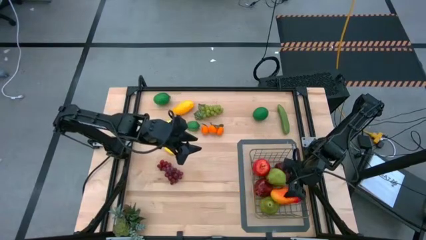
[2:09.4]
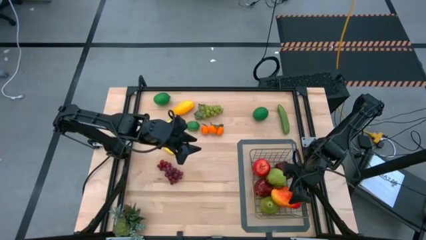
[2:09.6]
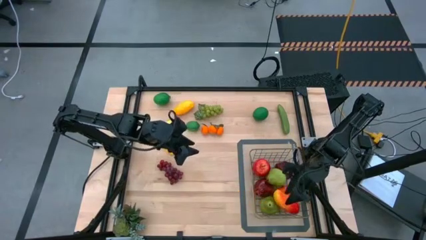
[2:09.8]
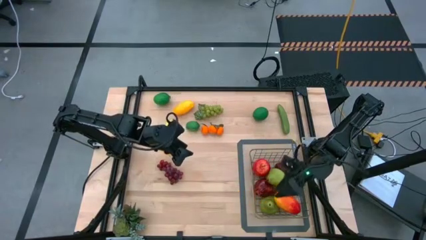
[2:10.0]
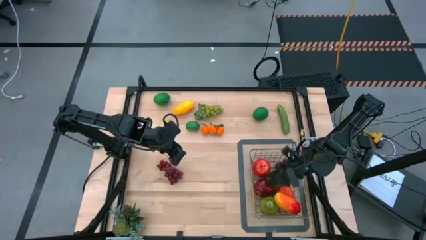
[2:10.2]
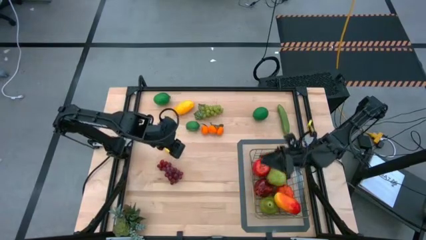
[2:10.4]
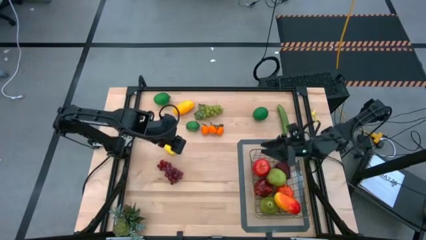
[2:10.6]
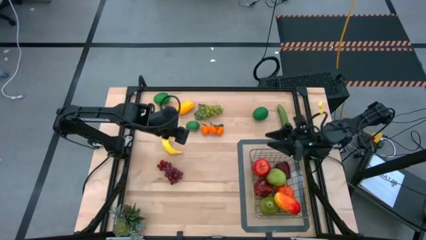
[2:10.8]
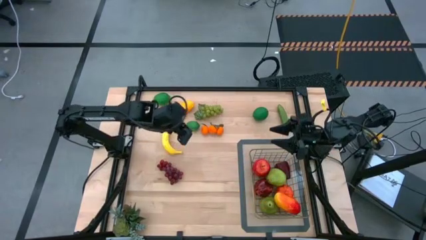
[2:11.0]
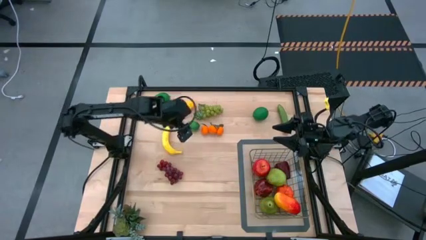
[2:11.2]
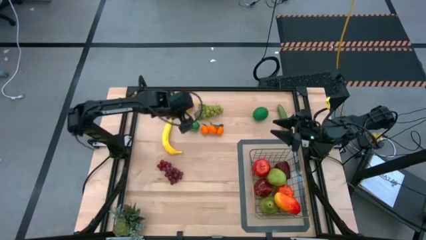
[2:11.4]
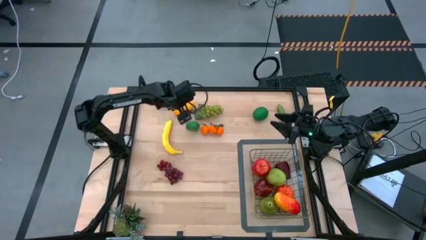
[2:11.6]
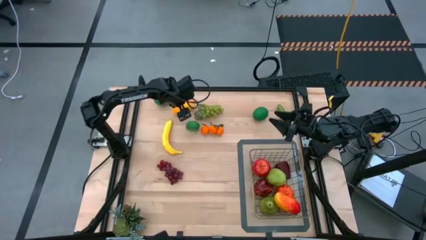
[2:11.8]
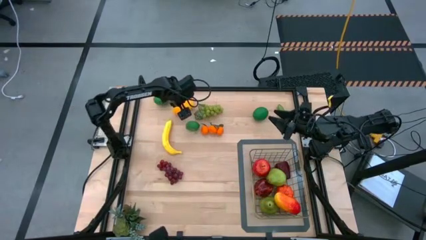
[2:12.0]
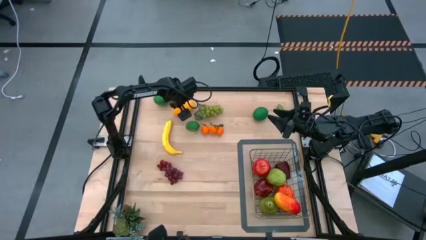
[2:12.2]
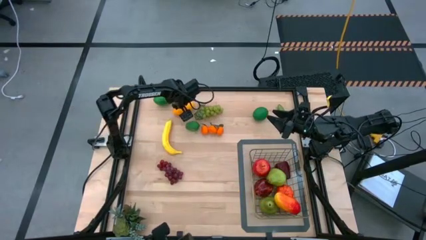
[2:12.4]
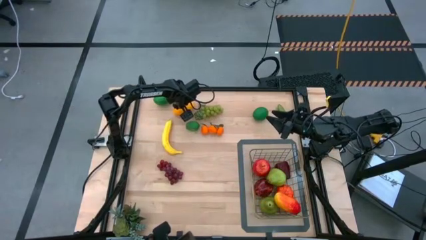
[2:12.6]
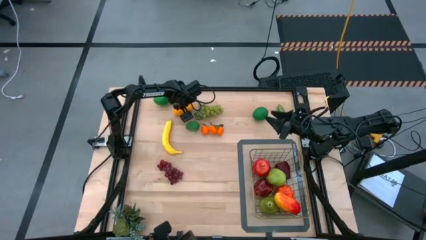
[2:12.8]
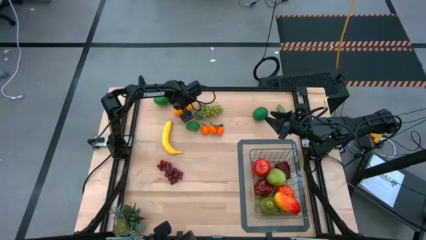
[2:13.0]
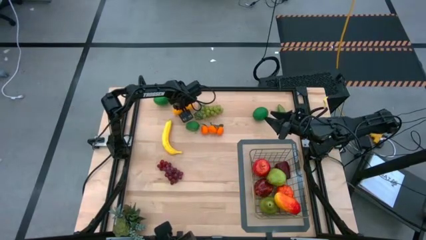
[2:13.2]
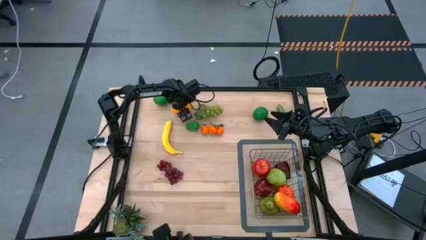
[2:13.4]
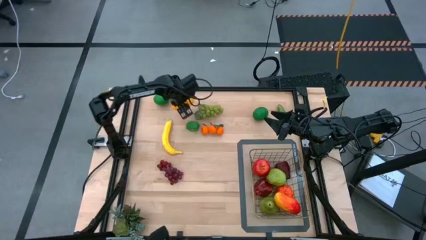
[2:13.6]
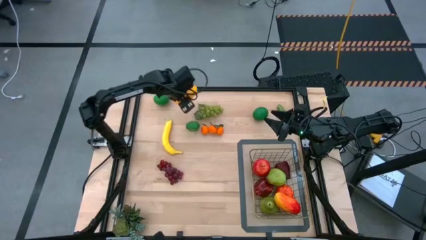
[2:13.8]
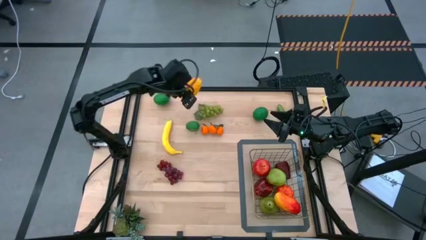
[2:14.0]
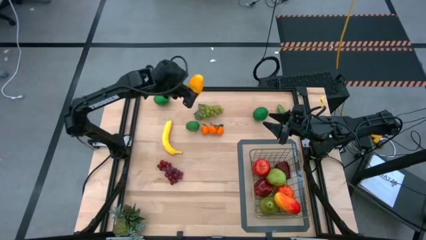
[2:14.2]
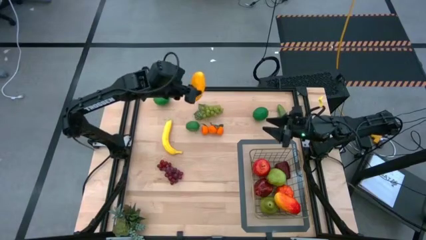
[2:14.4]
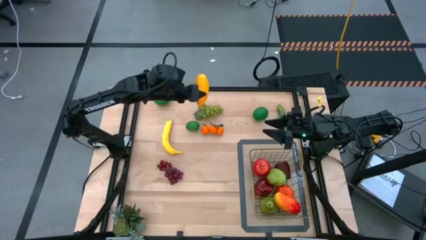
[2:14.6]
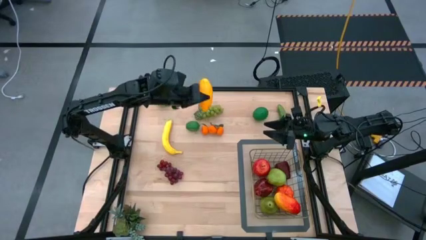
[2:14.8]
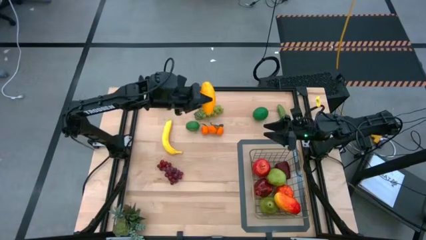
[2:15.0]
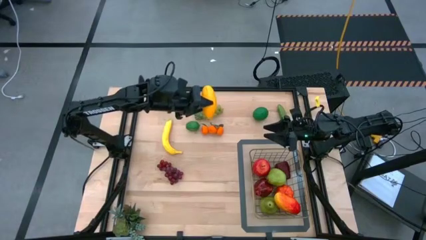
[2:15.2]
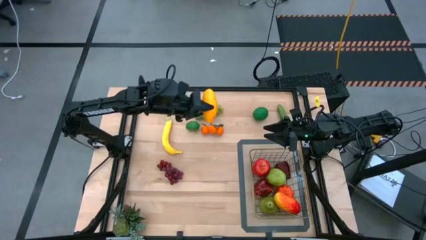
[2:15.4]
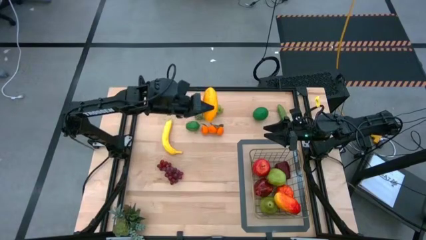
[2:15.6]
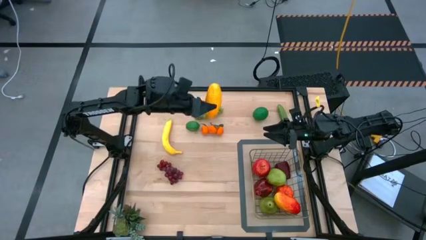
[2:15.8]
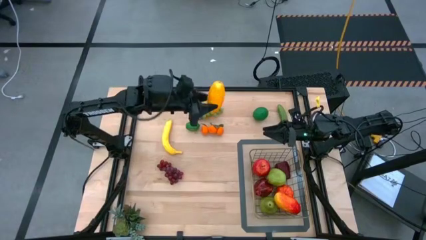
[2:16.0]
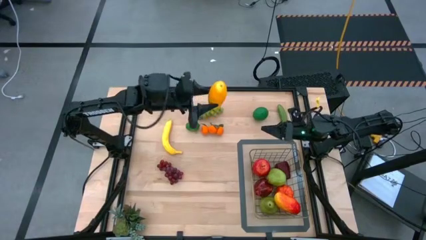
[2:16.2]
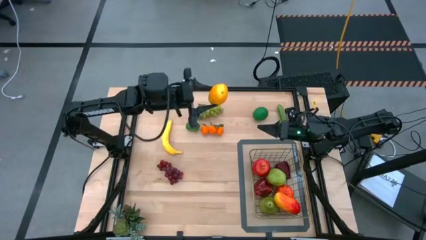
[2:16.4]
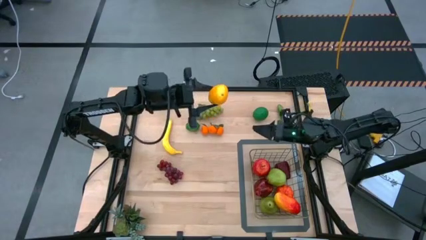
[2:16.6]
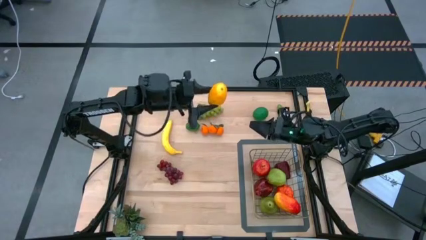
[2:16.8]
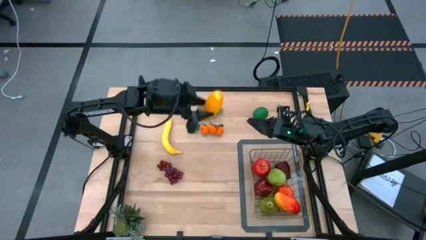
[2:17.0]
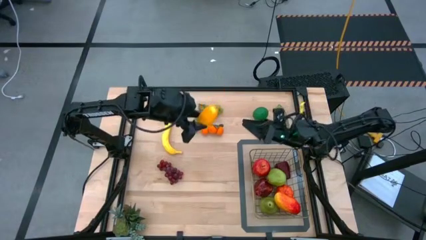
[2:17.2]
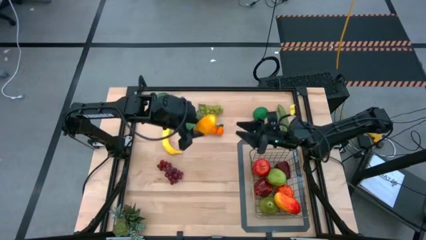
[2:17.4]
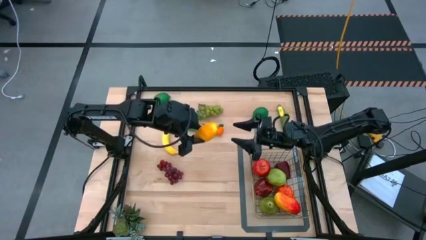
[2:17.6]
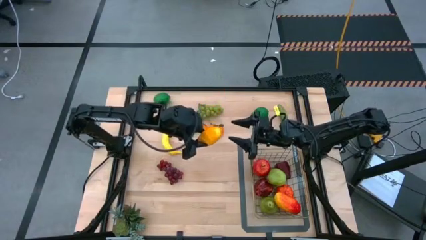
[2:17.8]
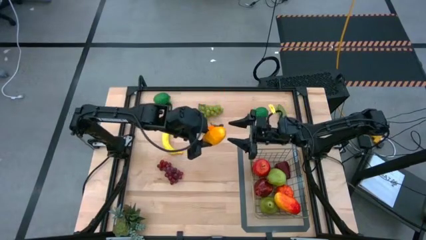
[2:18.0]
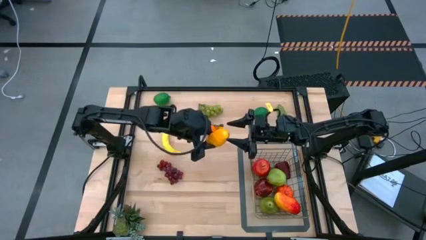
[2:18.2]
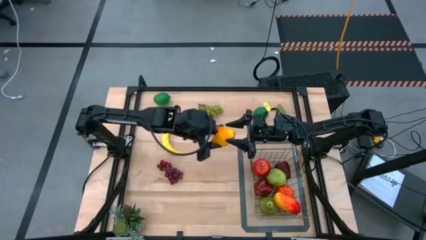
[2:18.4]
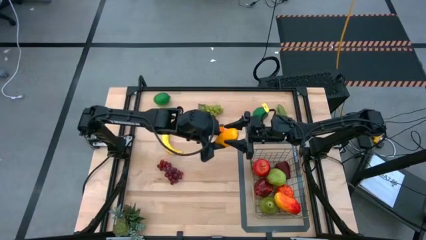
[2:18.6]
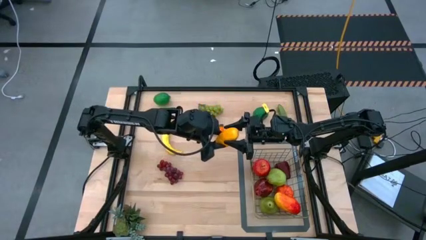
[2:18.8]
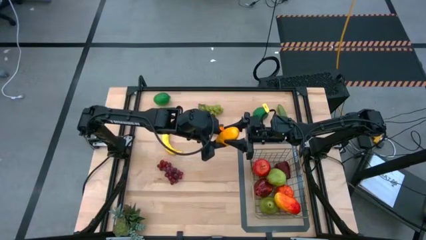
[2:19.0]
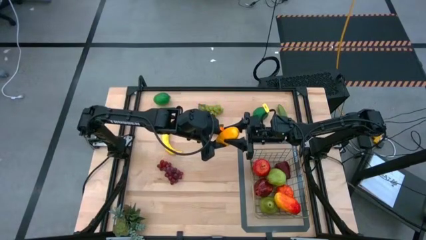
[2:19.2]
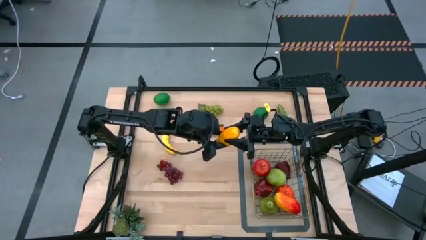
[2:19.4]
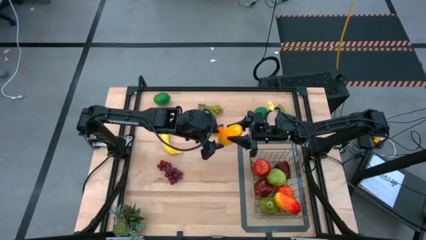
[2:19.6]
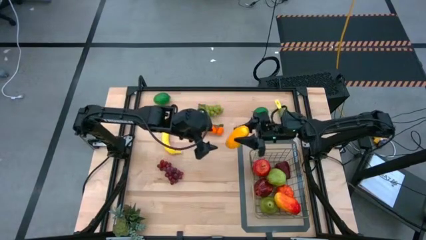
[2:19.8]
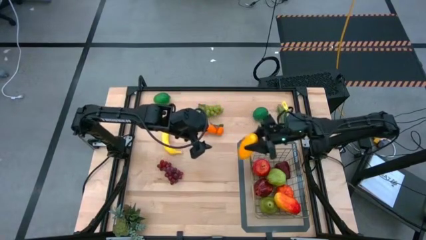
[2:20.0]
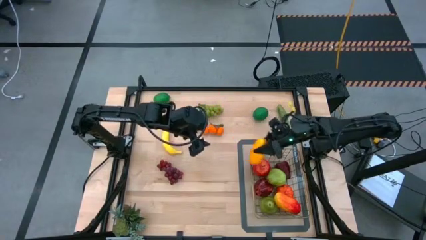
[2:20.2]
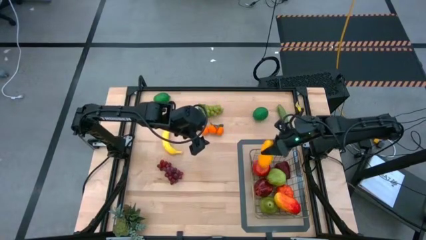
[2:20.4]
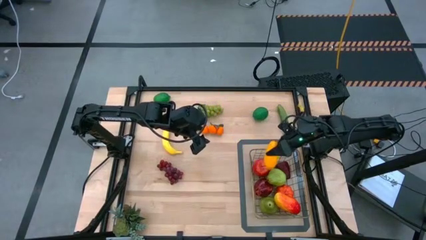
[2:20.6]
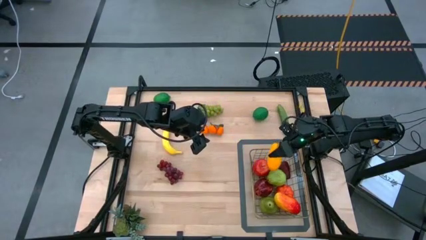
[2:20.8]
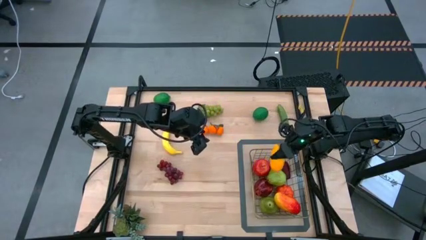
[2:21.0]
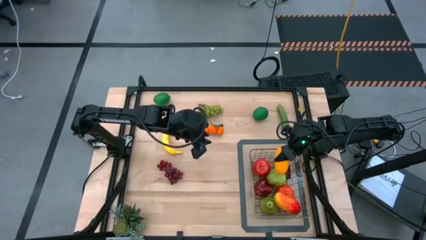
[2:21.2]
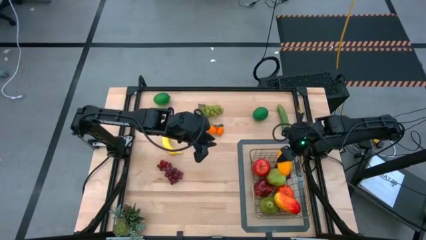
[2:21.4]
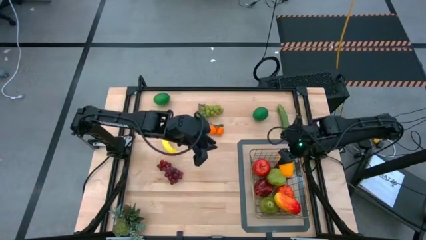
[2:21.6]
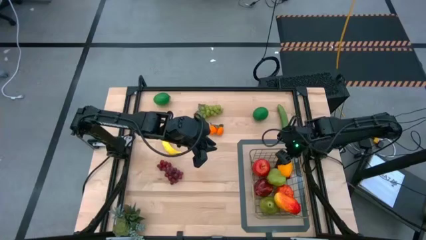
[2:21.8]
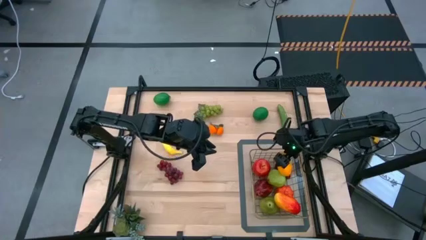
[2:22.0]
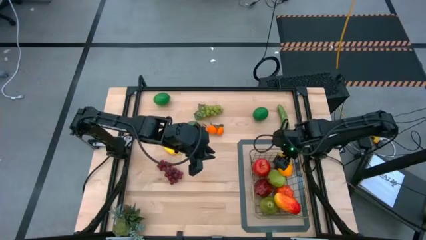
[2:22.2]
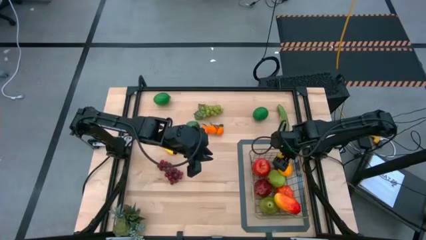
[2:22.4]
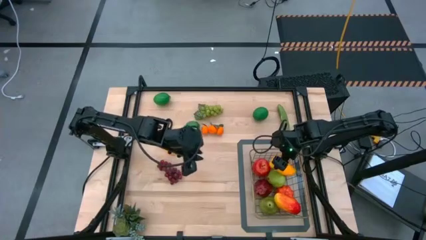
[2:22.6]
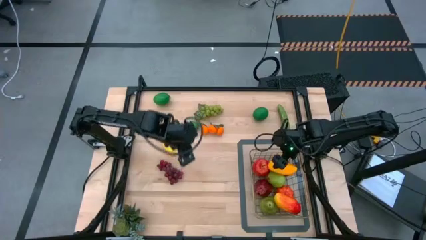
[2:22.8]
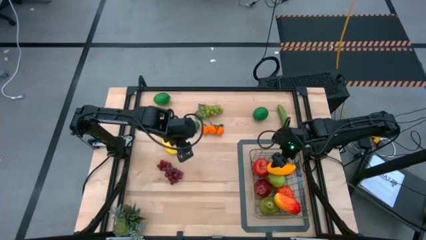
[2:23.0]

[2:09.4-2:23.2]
Task: Build produce basket
Put the yellow mango into the wire basket

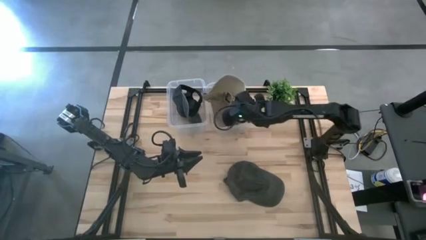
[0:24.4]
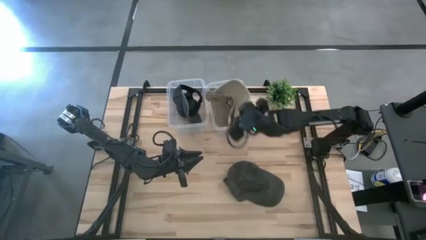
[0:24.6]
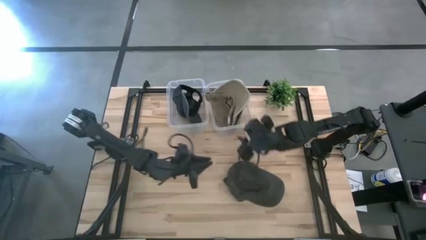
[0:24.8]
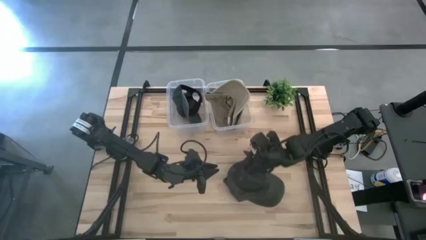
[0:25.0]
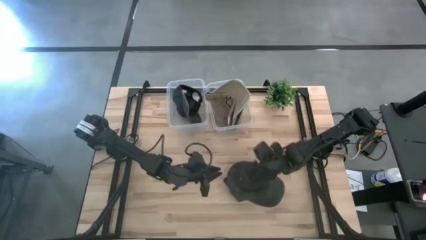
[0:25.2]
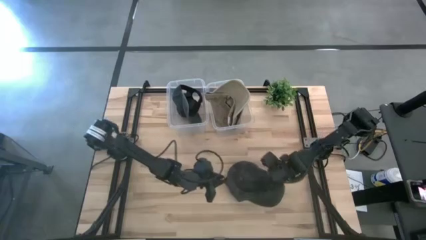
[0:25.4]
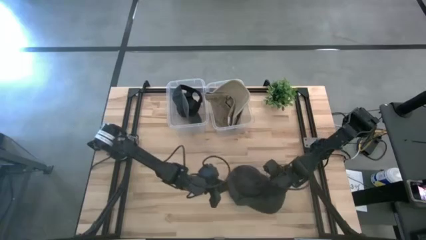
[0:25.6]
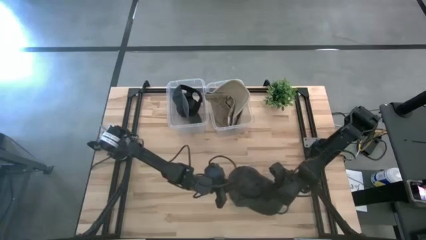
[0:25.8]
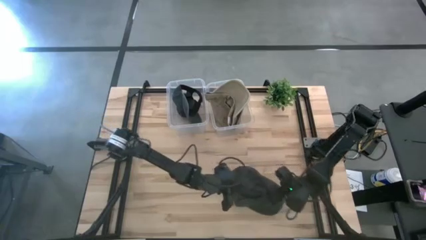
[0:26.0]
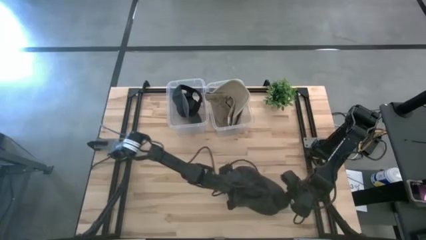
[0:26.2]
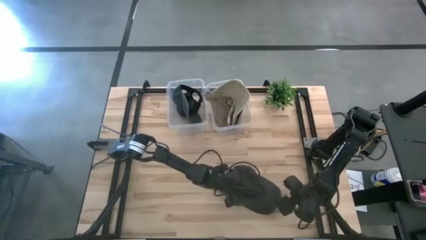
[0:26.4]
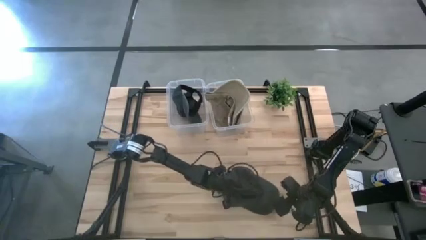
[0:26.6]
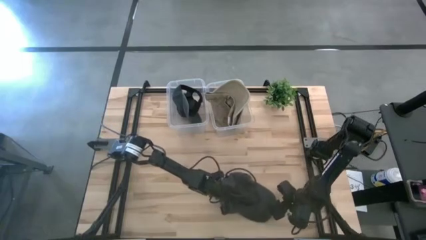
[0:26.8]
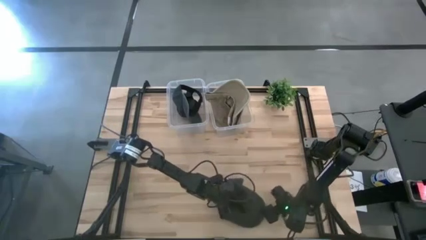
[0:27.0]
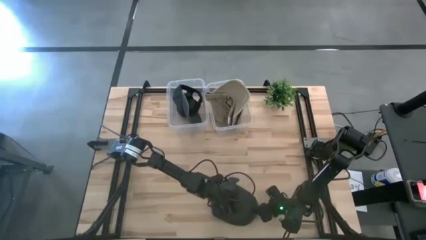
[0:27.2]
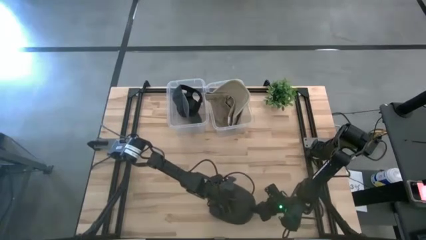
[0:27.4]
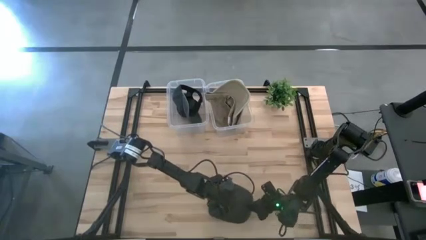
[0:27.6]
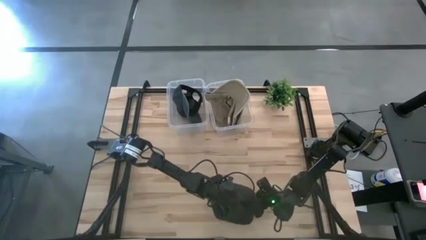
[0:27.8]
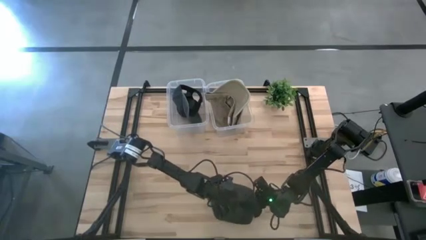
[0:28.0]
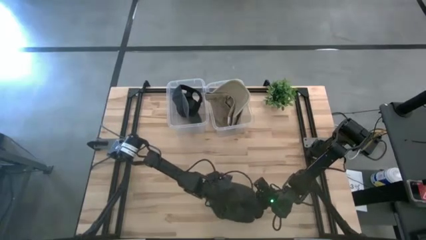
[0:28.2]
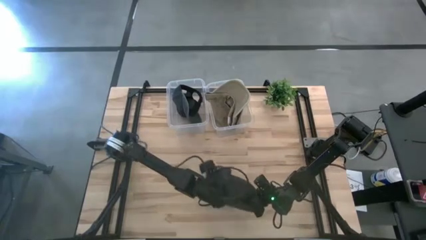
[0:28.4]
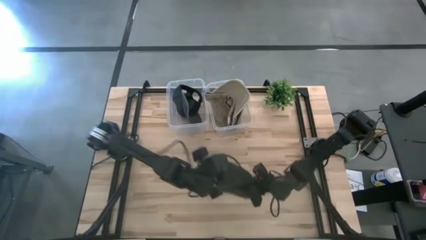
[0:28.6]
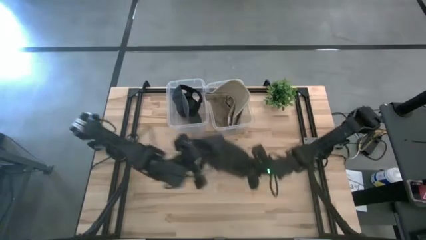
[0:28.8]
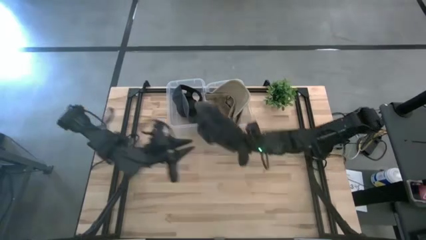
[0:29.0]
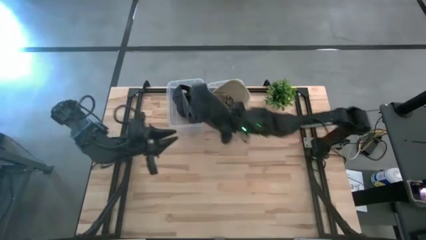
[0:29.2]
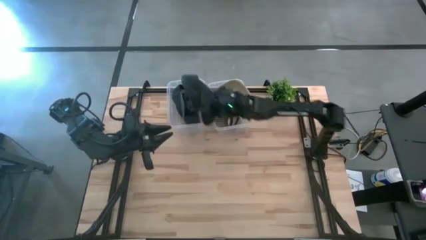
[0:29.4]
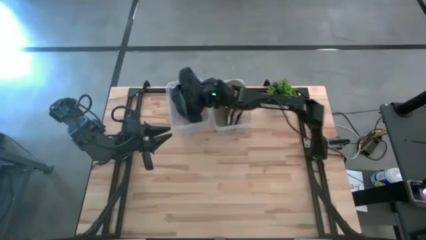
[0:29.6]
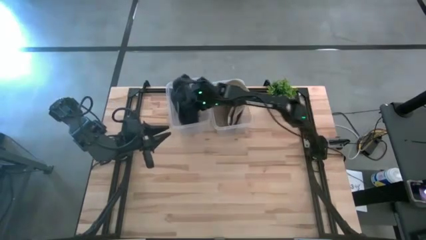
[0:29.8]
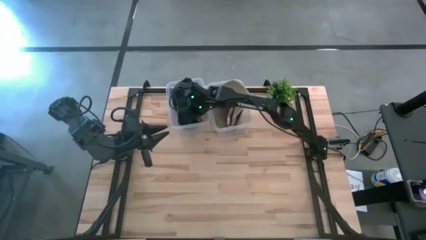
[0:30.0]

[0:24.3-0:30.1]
Task: Pick & Place hat
Put the black cap into the left transparent container
